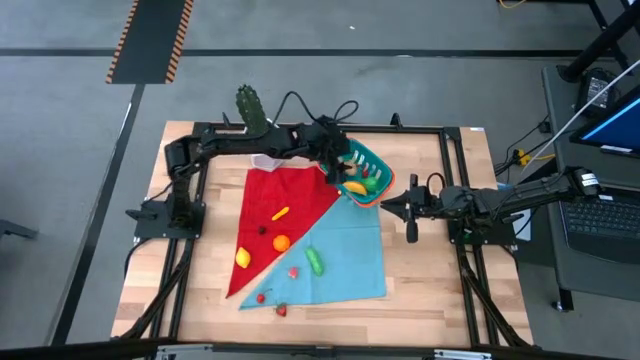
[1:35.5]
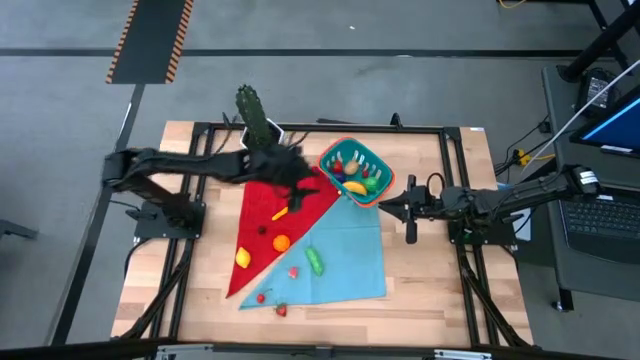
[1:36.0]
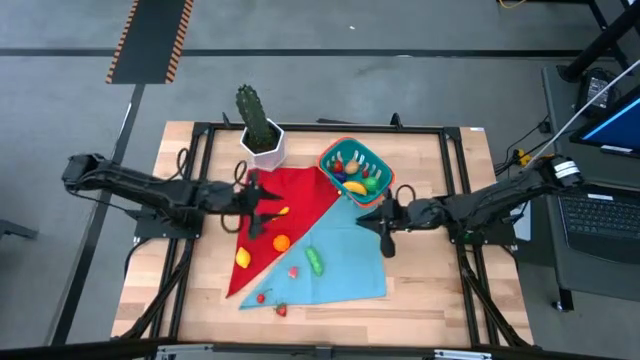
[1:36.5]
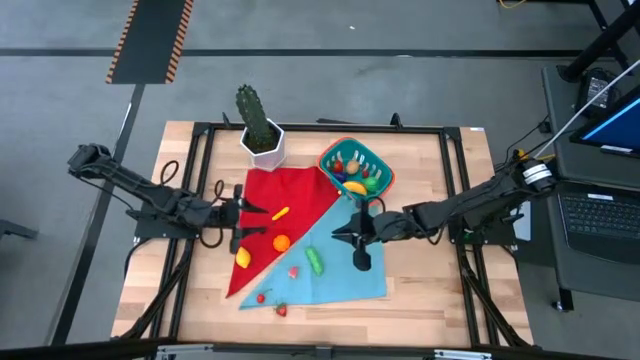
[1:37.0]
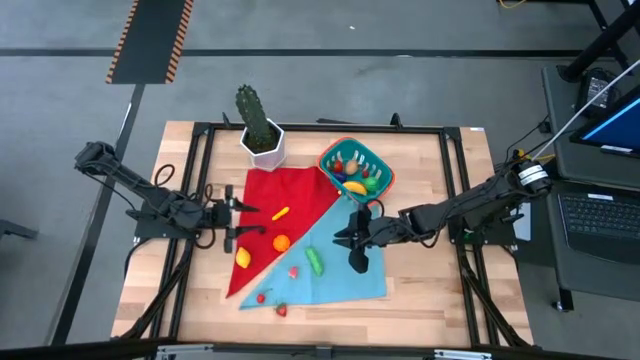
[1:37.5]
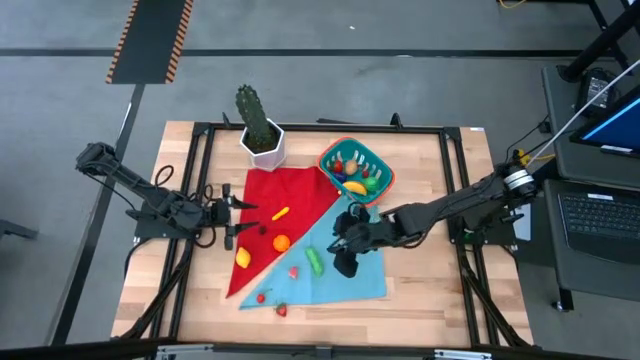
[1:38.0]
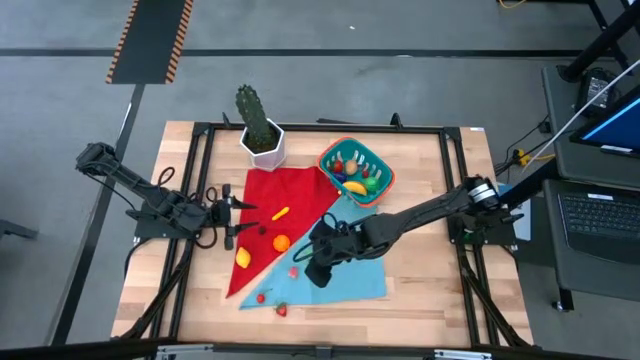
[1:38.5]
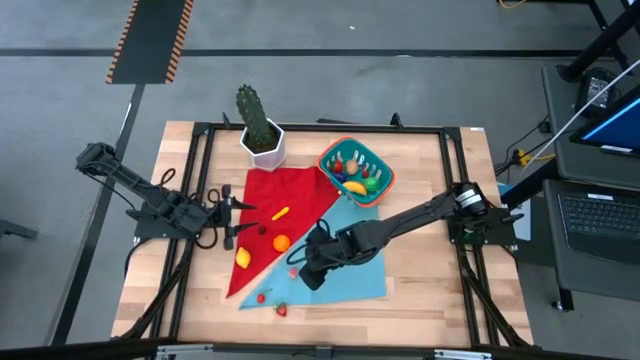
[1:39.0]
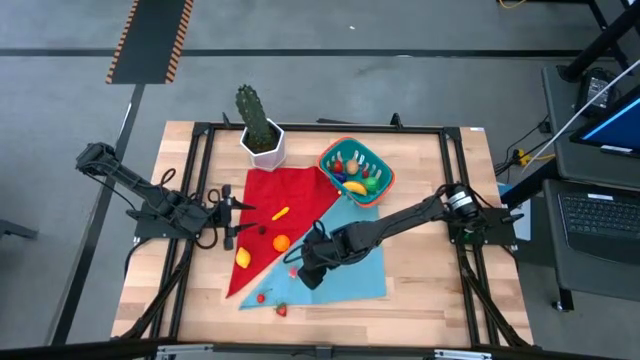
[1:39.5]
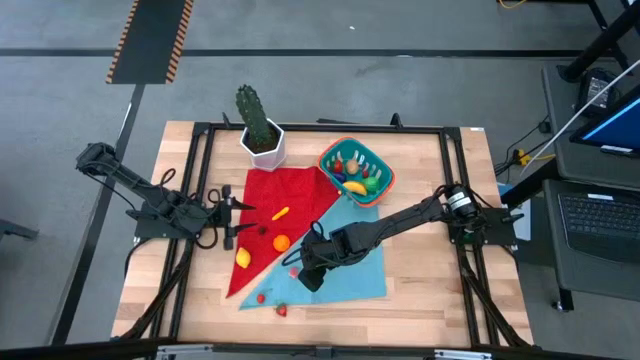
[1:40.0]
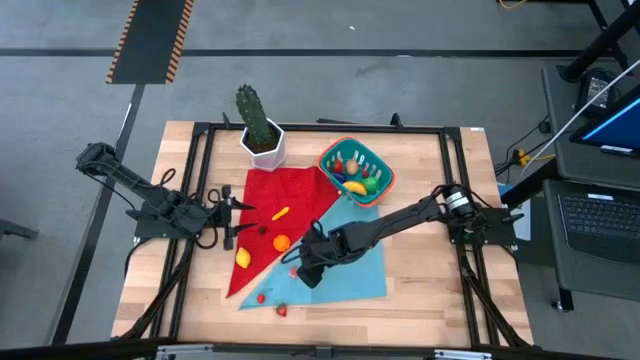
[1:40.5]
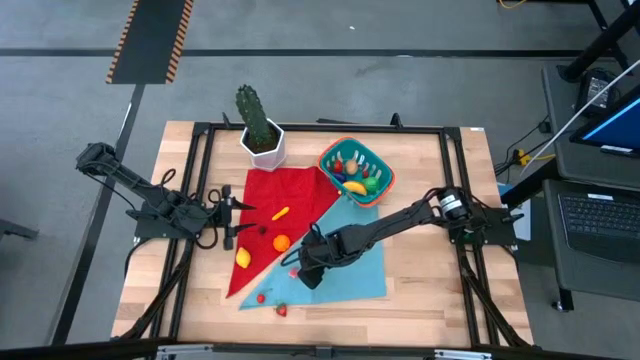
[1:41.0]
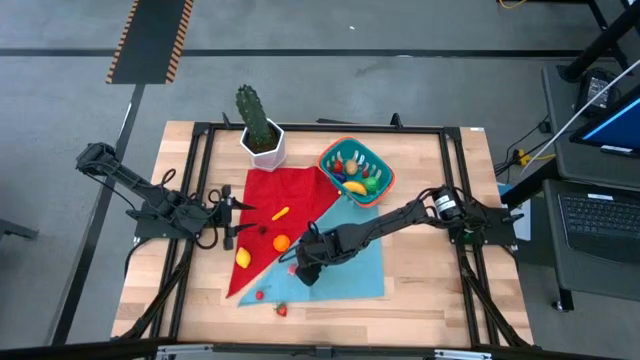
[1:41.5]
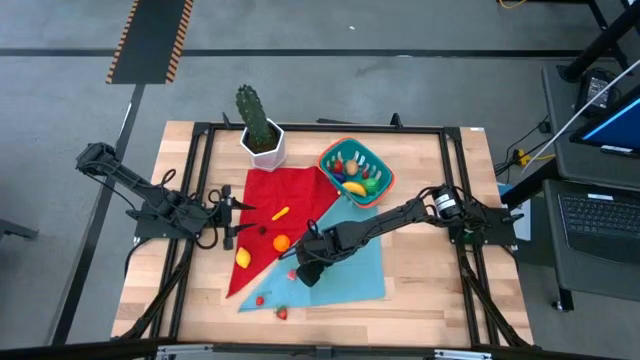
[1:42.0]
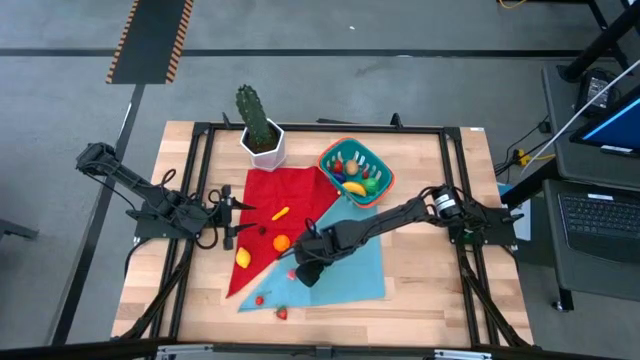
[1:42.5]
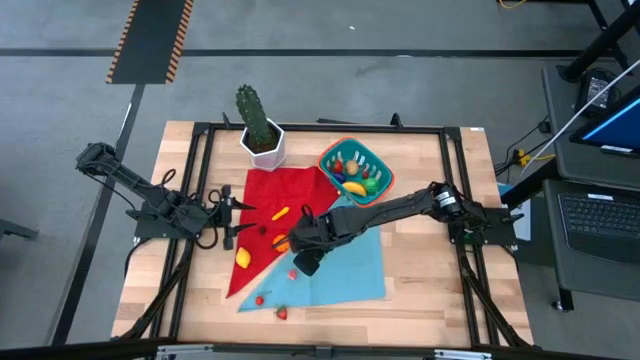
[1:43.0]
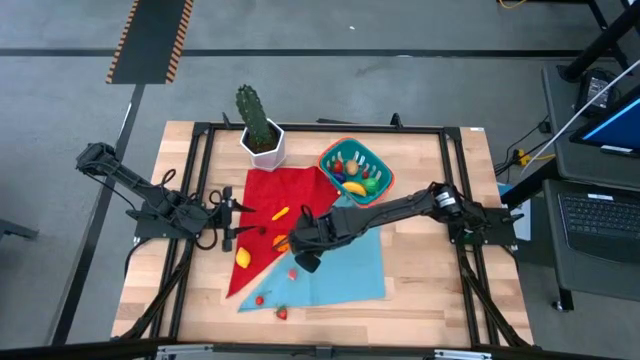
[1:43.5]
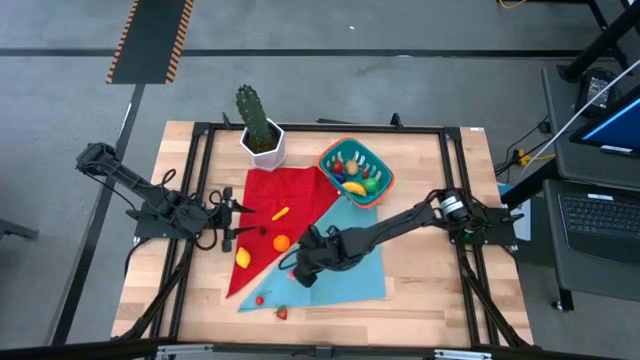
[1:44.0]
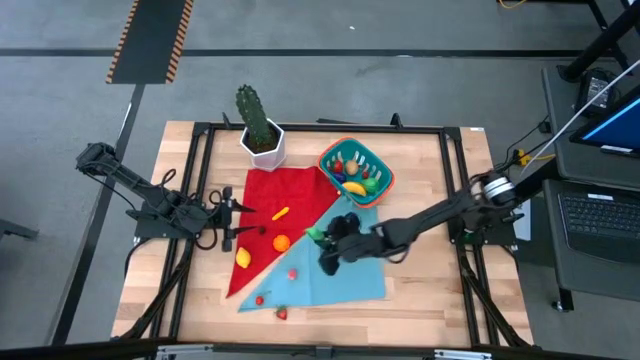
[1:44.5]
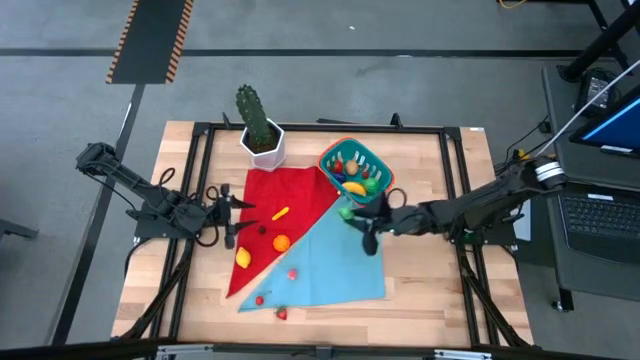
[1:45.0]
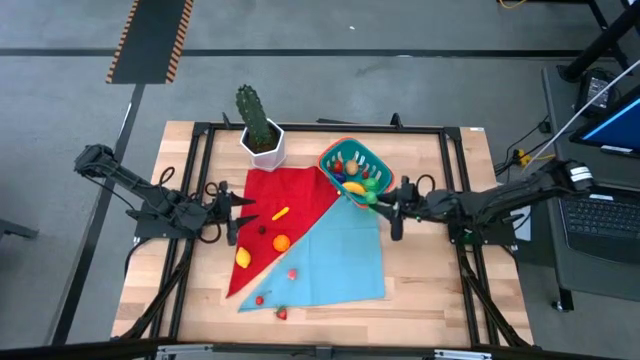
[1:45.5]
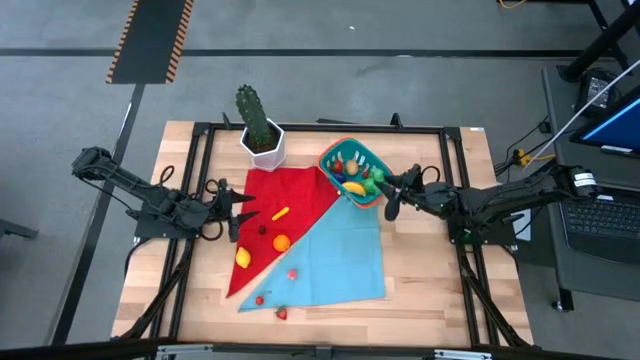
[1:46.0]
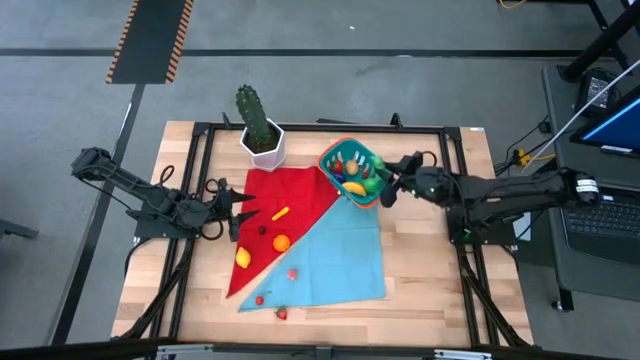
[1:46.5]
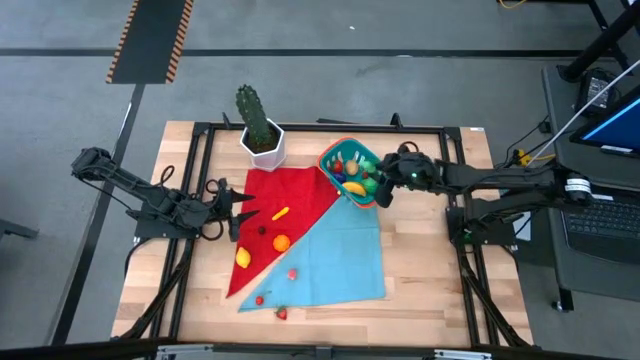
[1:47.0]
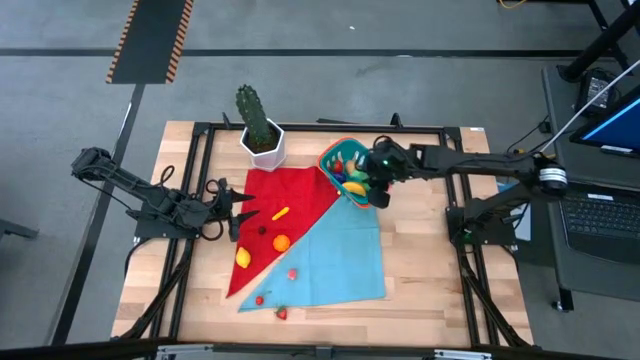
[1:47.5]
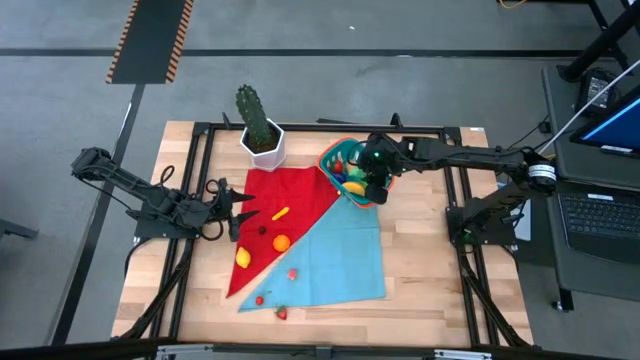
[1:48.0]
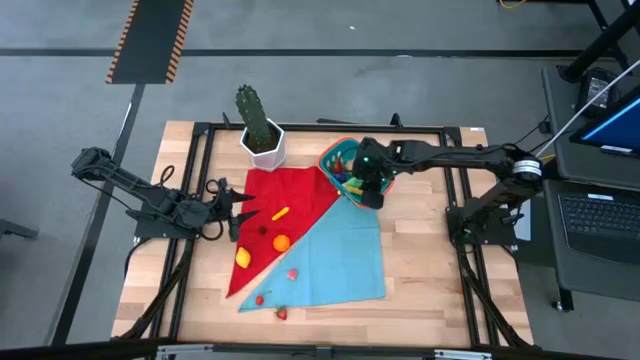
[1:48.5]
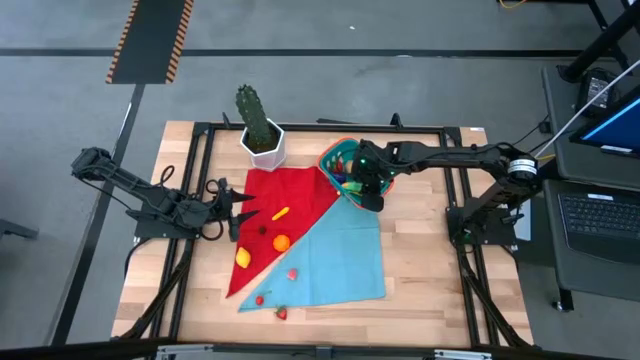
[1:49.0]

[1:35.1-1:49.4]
Task: Build produce basket
Put the green pea into the blue basket

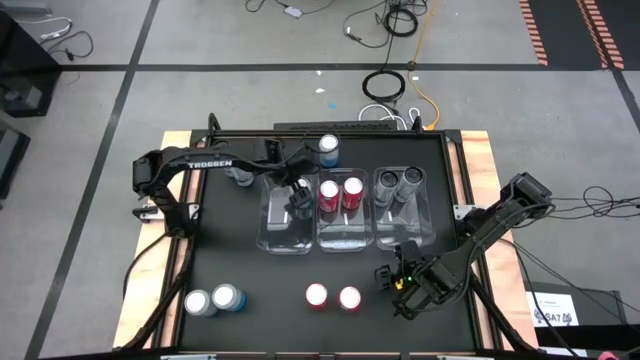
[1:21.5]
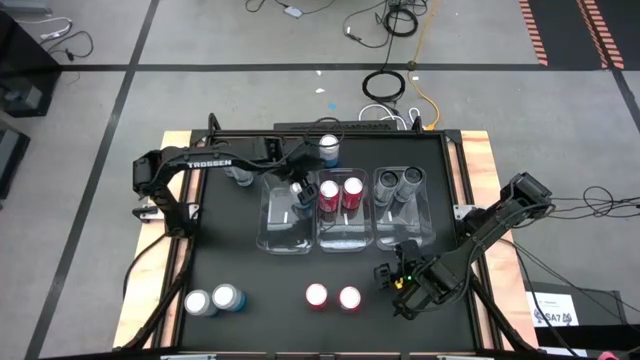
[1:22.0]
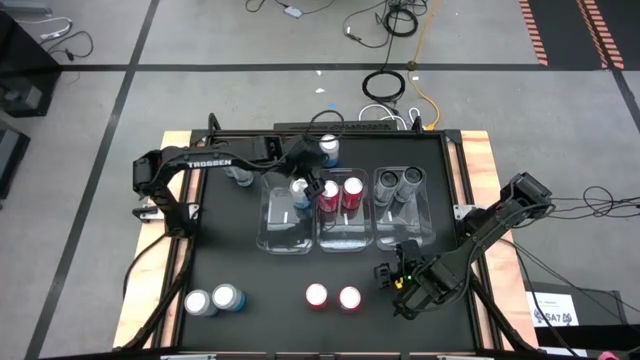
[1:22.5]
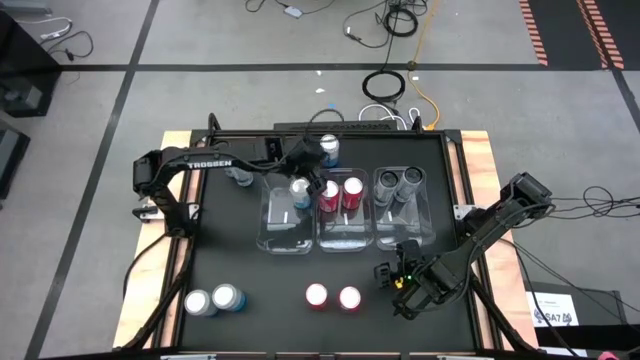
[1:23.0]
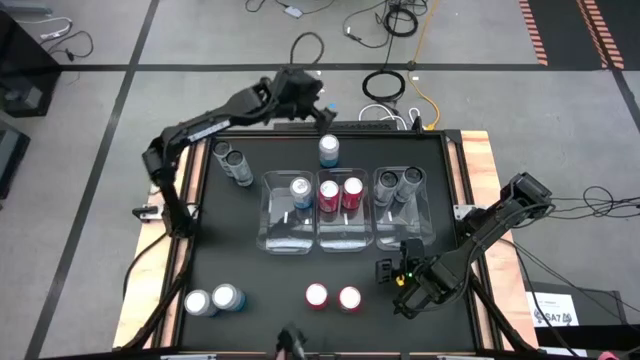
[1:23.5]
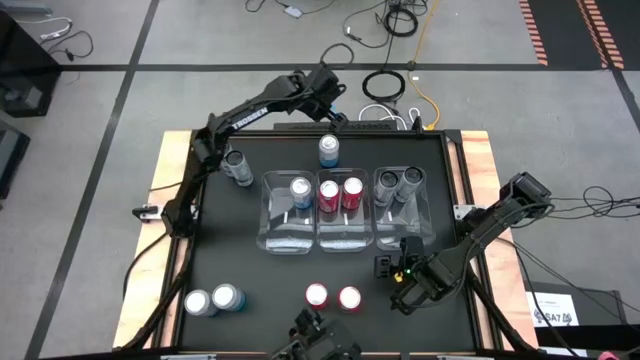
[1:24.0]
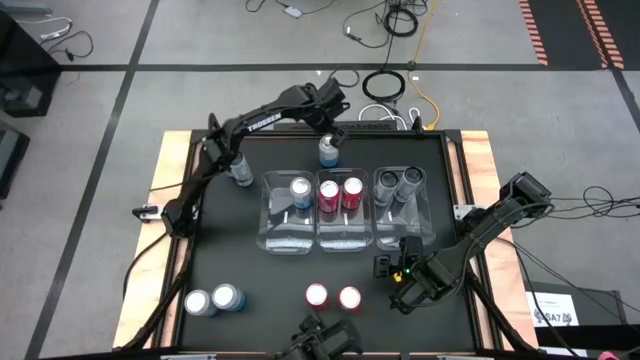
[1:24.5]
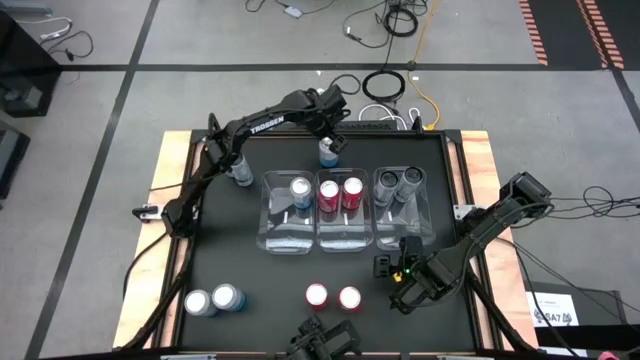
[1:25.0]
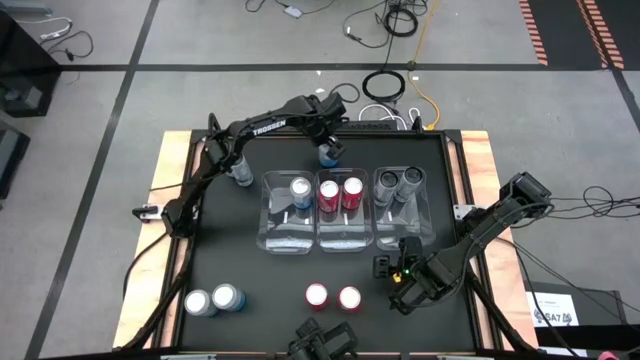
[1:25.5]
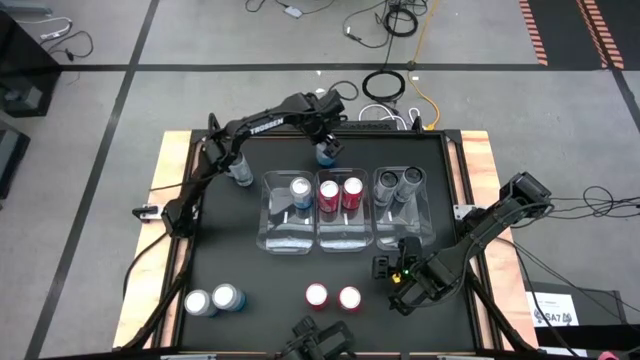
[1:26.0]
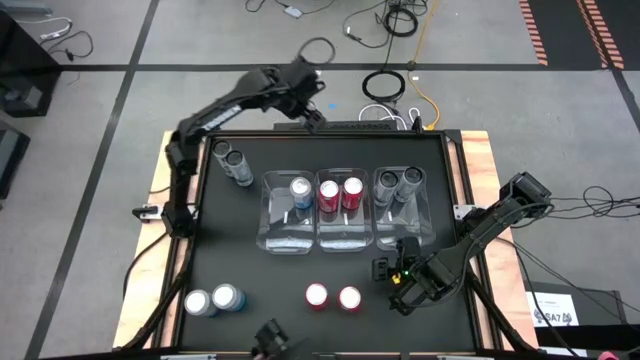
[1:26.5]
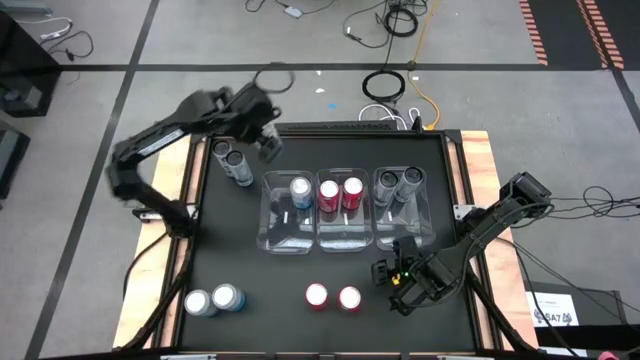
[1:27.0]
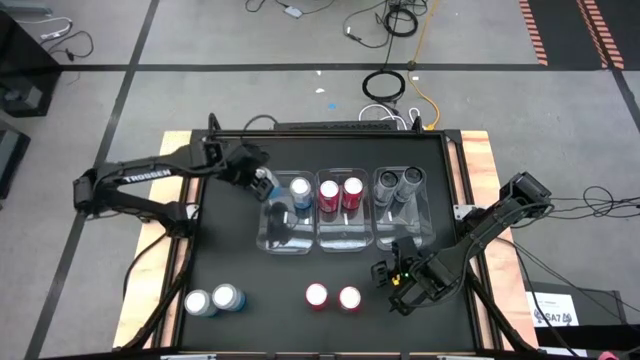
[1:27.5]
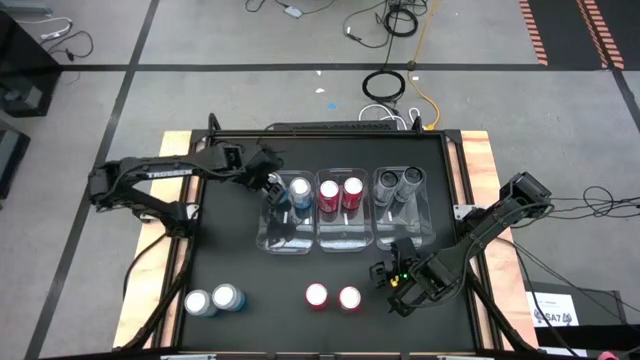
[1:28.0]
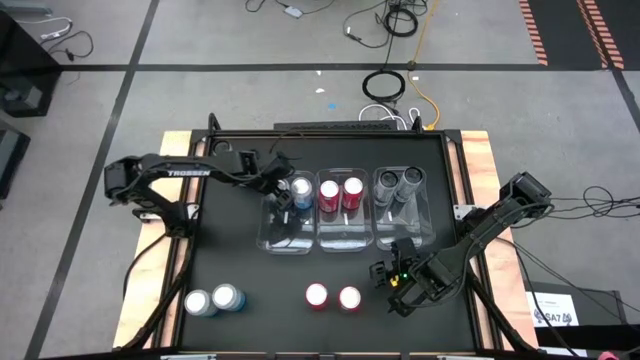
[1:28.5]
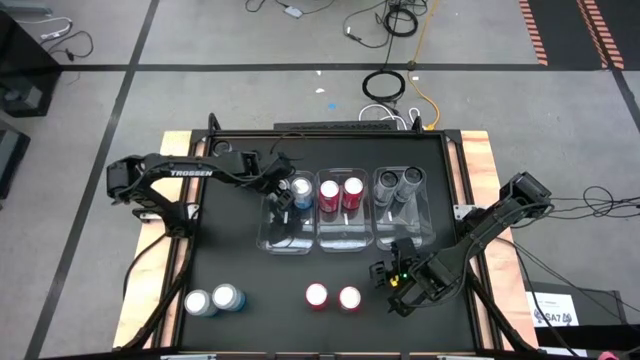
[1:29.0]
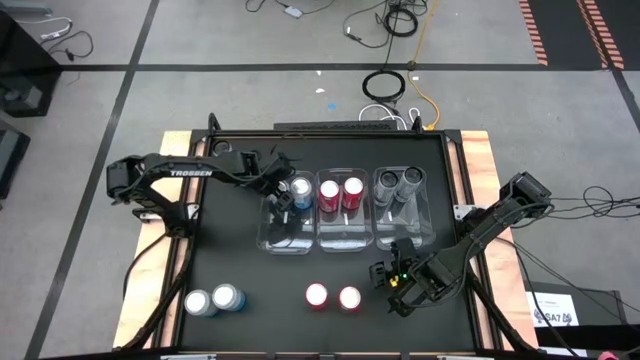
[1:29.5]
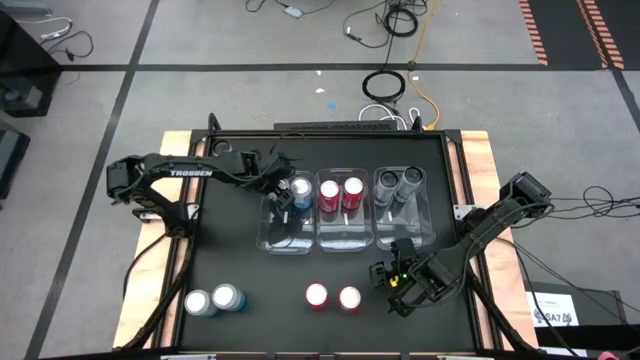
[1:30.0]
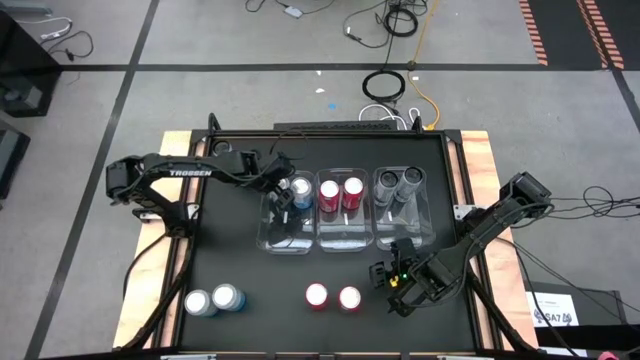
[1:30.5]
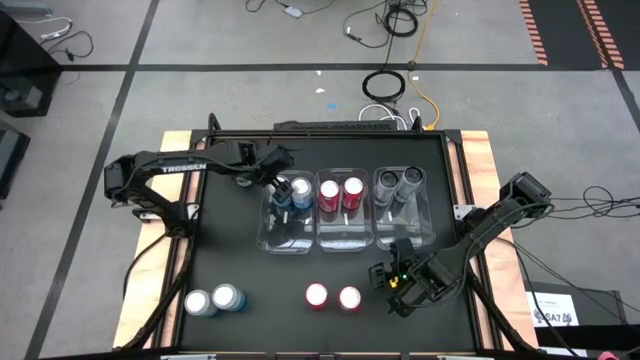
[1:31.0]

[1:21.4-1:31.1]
Task: Sort soda cans
Put the blue-white soda can into the left transparent bin
